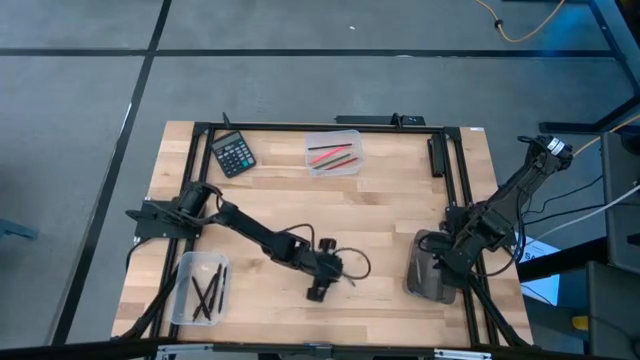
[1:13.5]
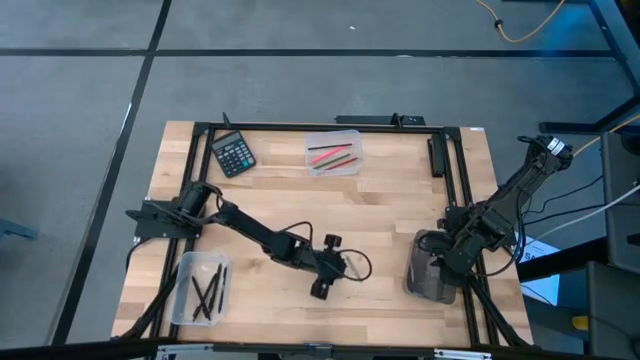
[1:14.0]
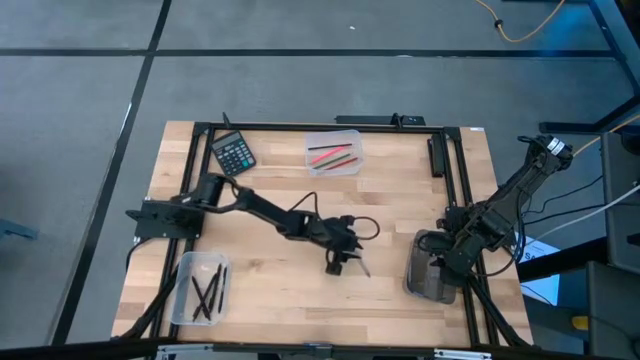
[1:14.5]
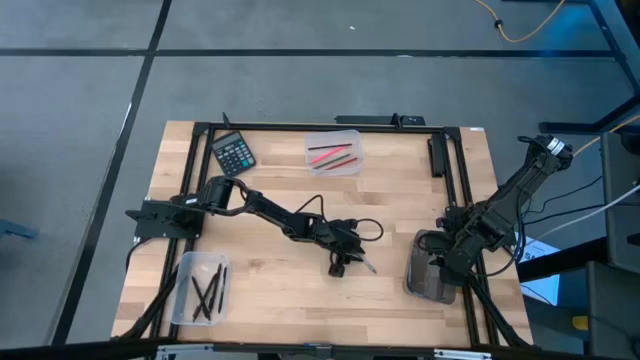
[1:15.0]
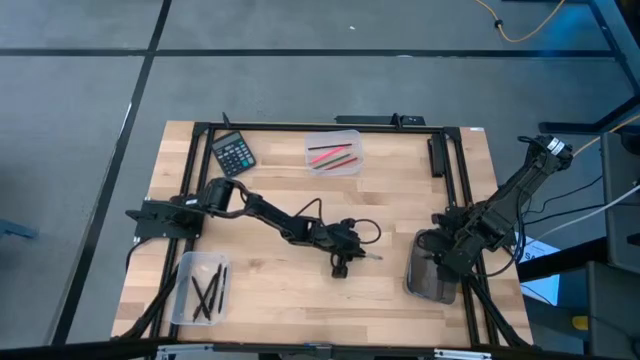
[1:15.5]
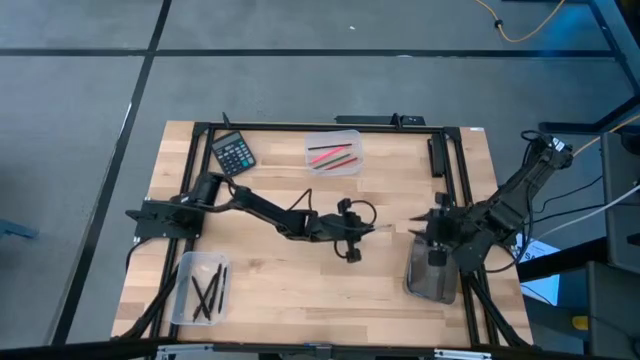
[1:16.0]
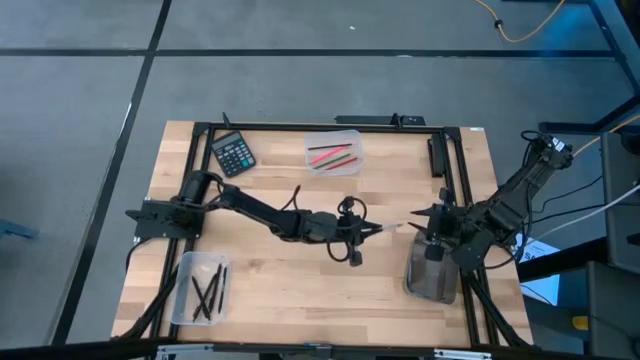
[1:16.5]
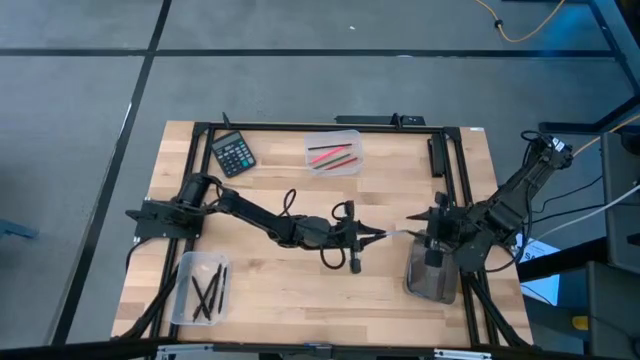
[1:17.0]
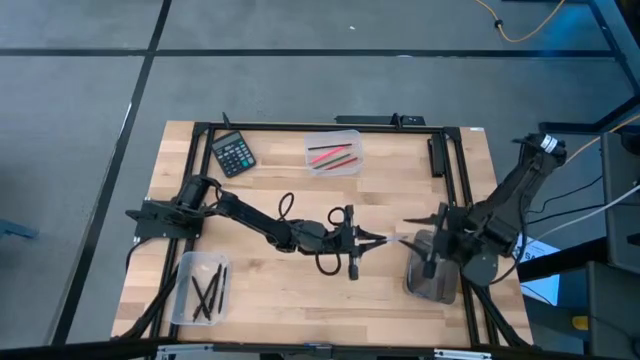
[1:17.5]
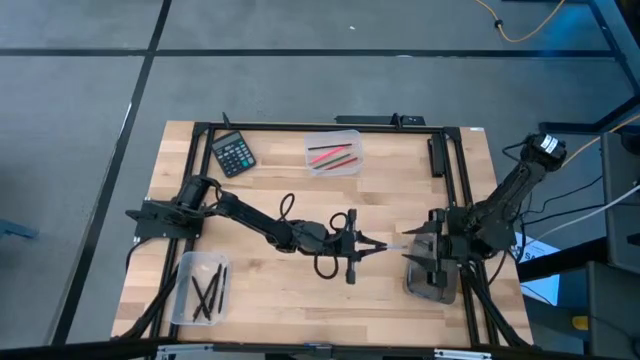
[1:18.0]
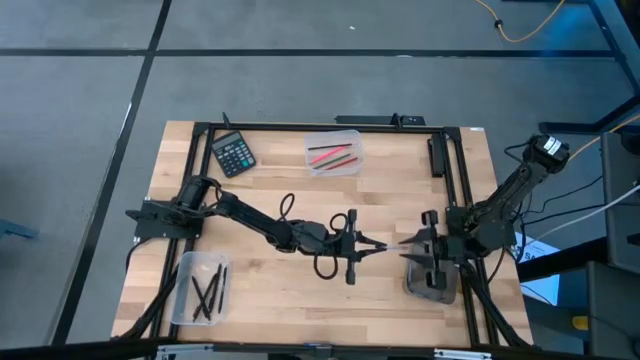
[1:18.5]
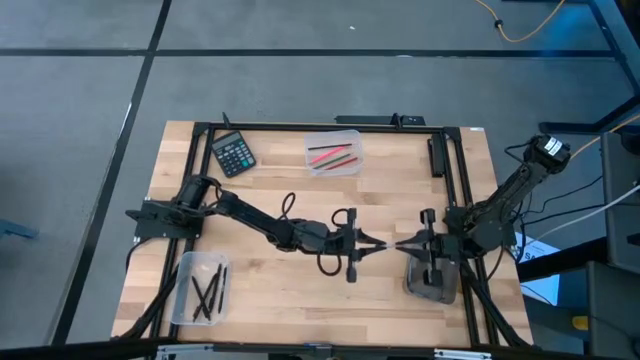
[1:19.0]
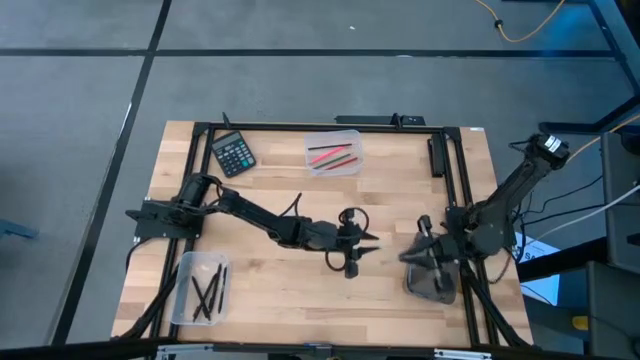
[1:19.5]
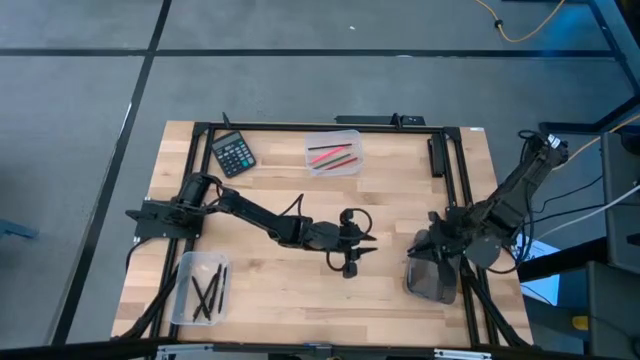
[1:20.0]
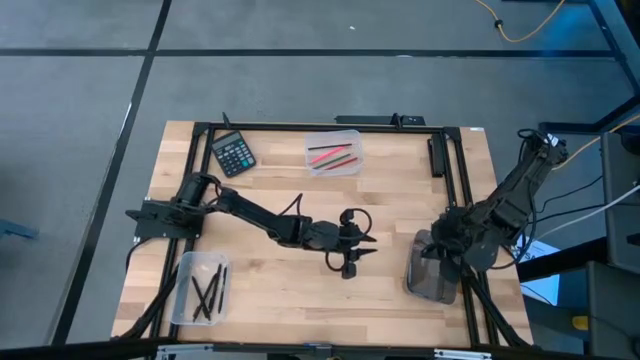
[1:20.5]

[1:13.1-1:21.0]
Task: Sort crayons/erasers/pens/pencils in bins
Put the gray crayon into the black bin

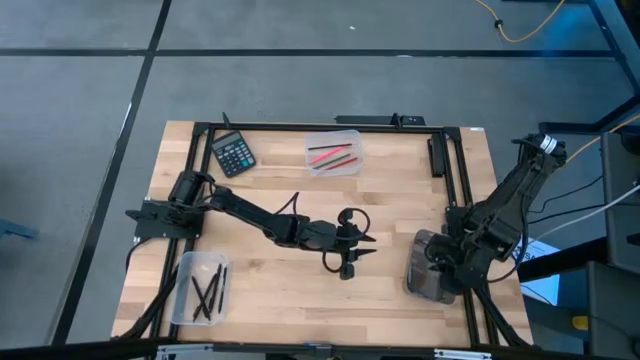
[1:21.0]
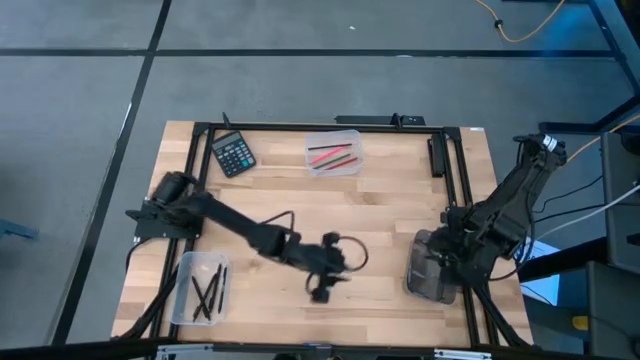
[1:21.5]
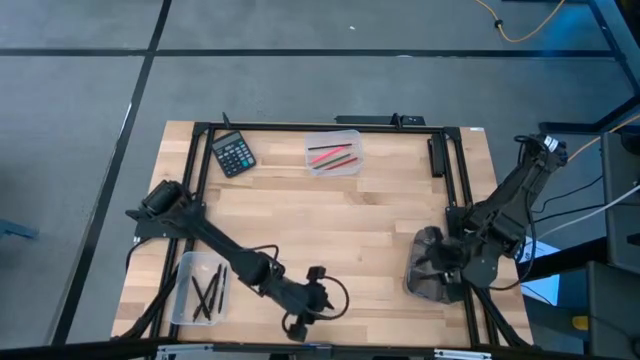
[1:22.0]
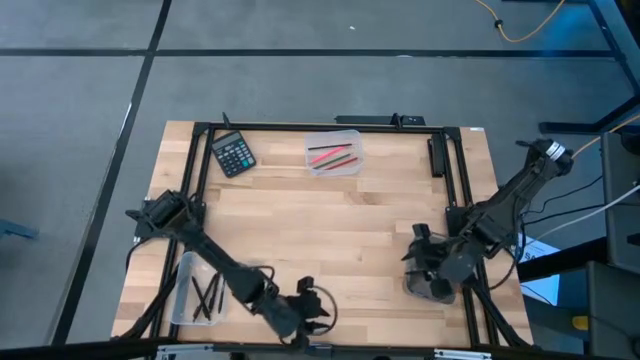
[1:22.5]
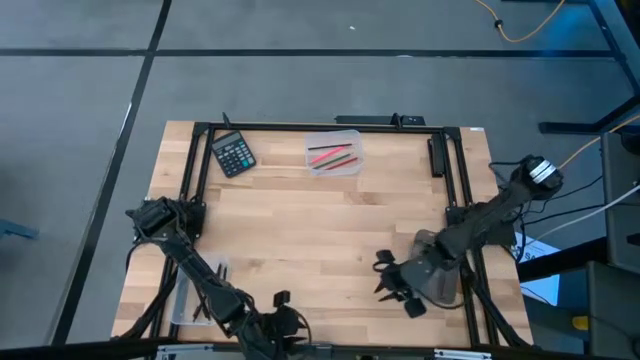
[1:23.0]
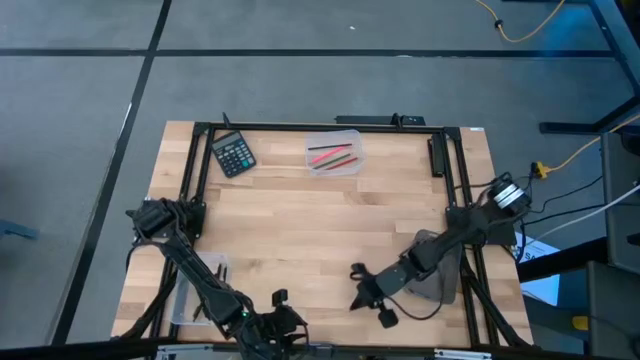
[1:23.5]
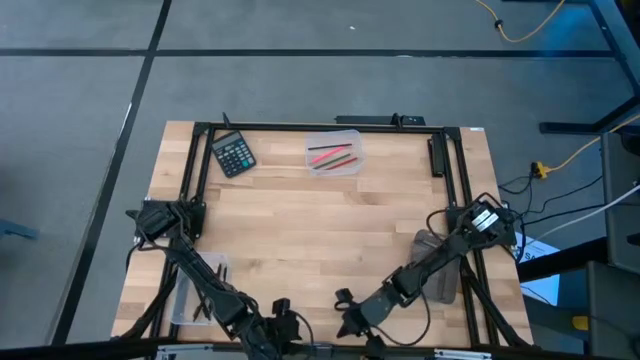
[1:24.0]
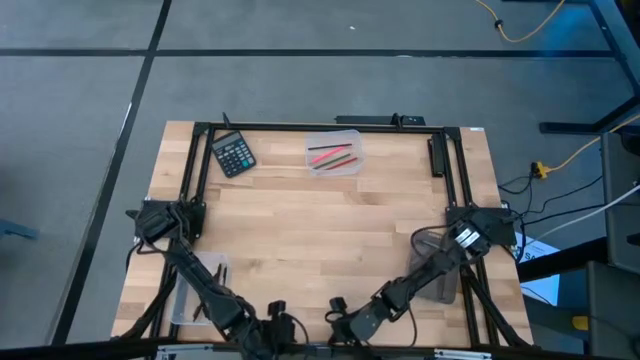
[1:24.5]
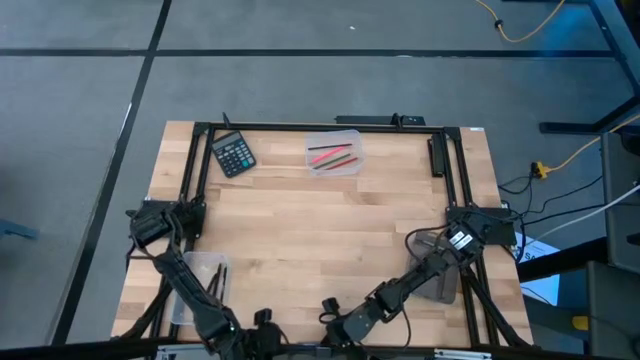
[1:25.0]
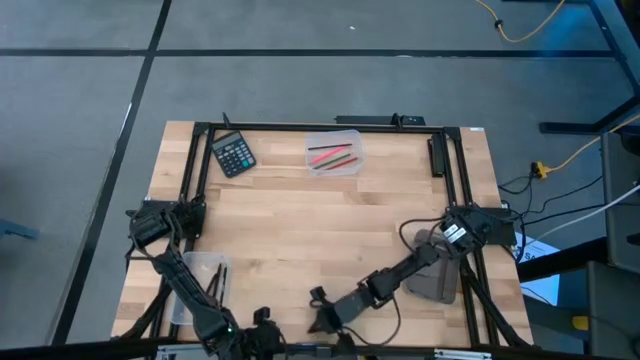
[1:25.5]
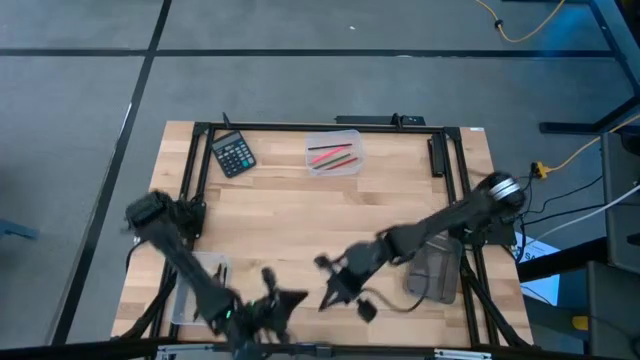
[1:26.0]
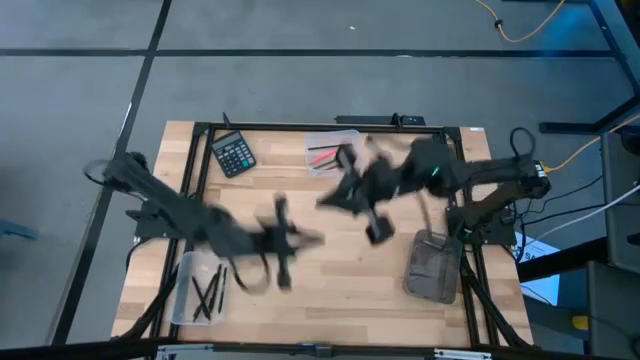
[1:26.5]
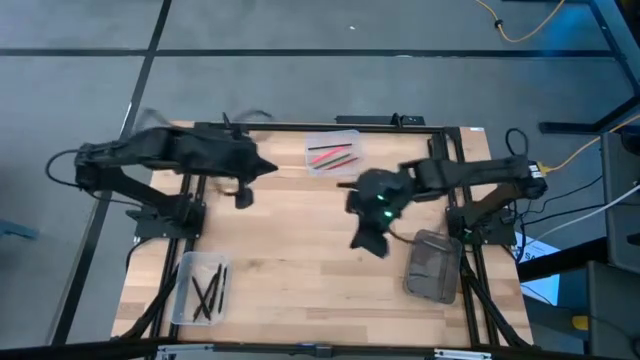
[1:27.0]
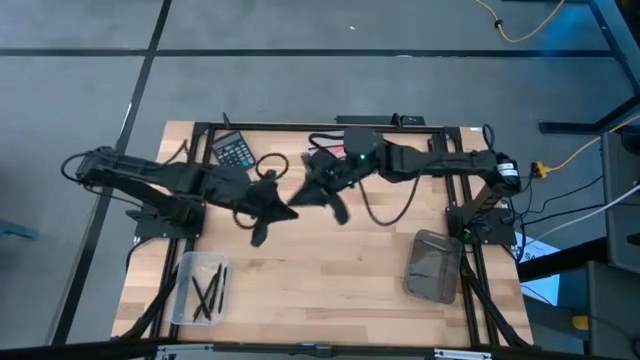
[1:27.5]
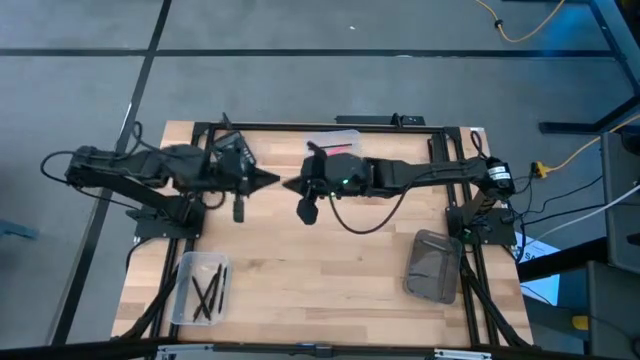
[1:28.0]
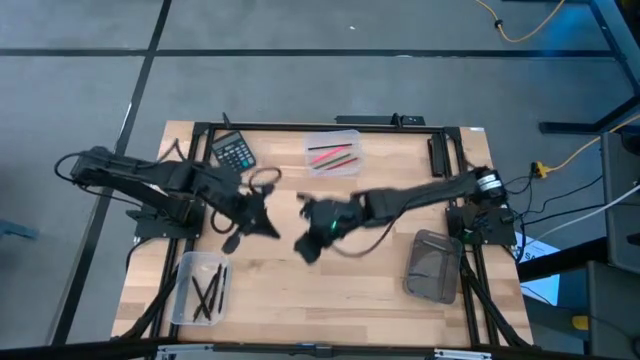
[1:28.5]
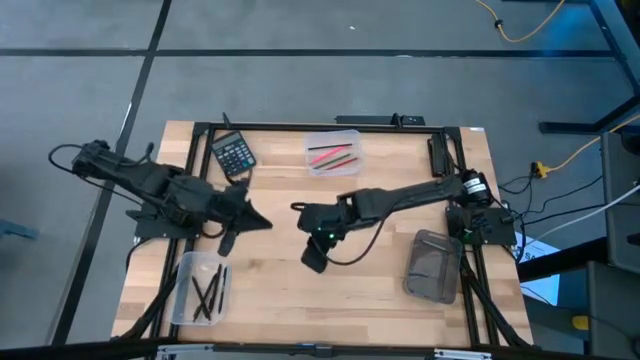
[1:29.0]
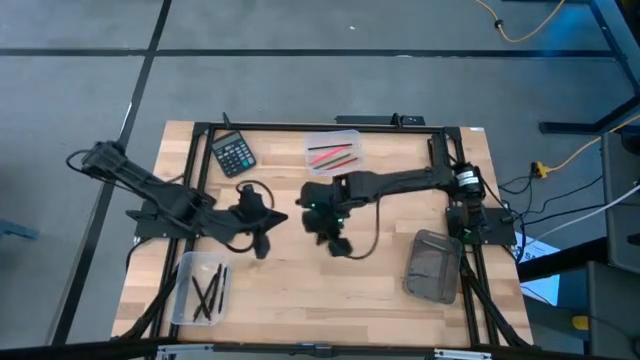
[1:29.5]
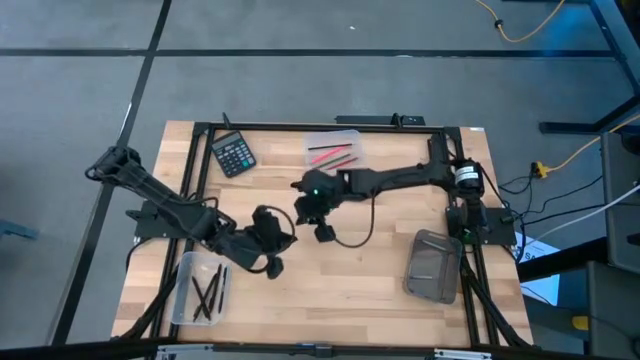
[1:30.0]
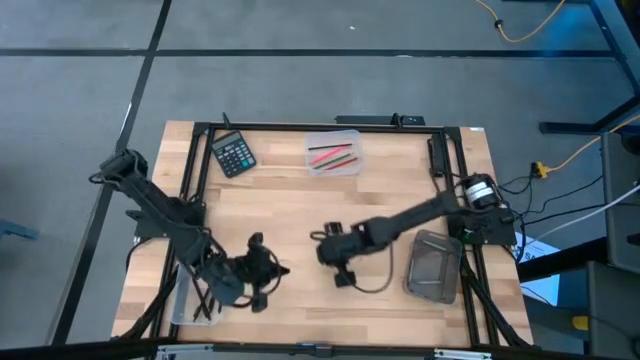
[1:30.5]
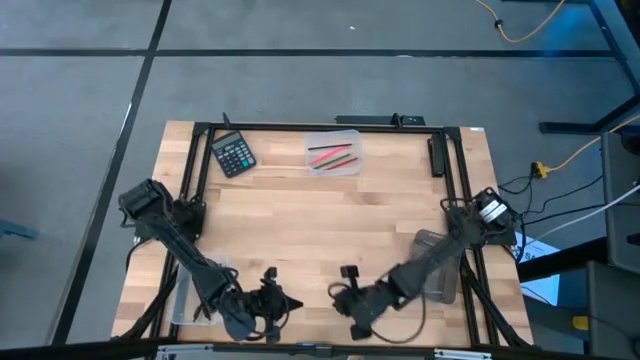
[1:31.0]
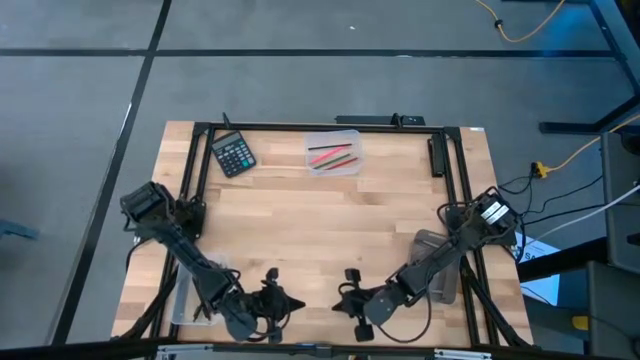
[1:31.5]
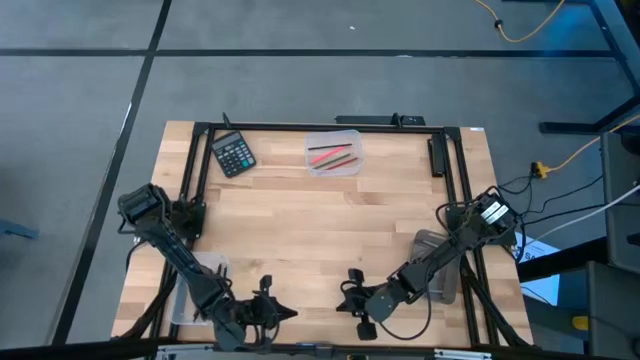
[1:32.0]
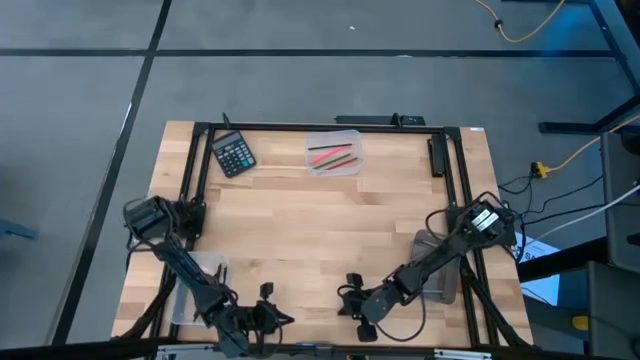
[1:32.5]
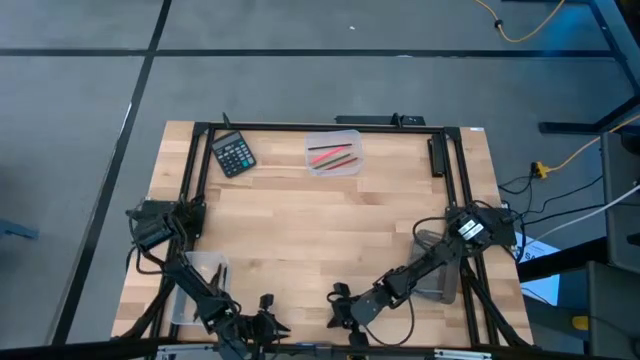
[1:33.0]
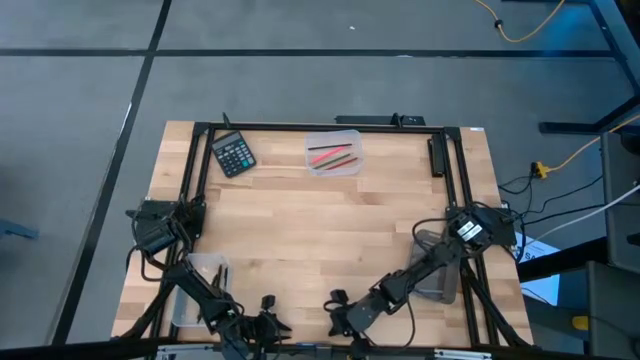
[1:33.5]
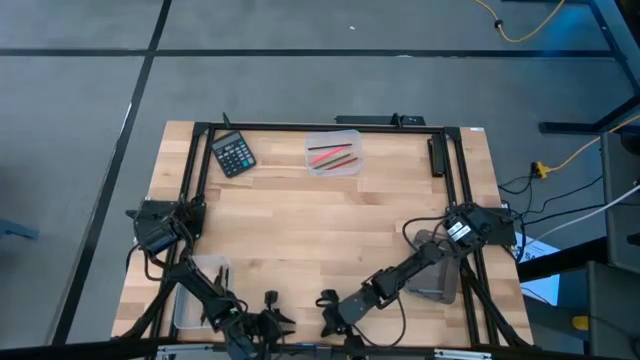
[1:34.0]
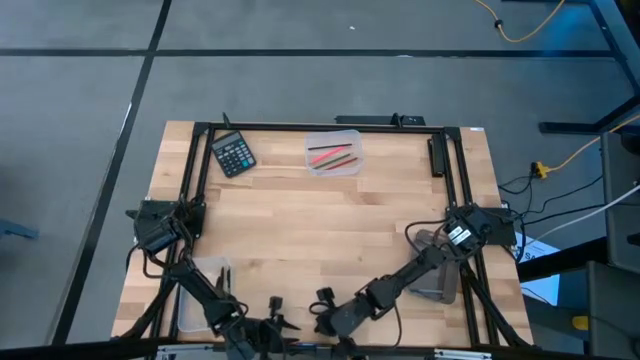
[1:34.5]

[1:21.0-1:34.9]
Put the blue crayon into the black bin
